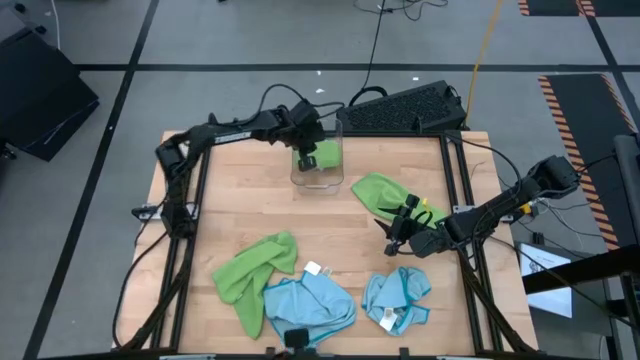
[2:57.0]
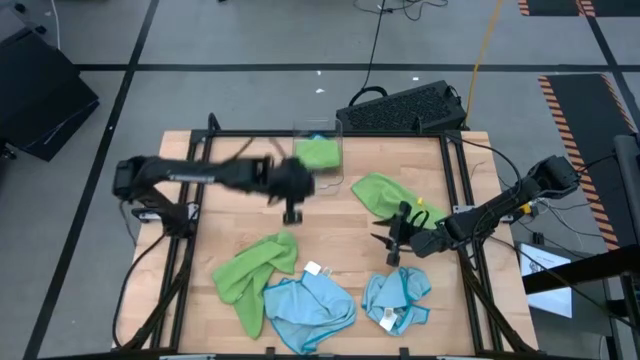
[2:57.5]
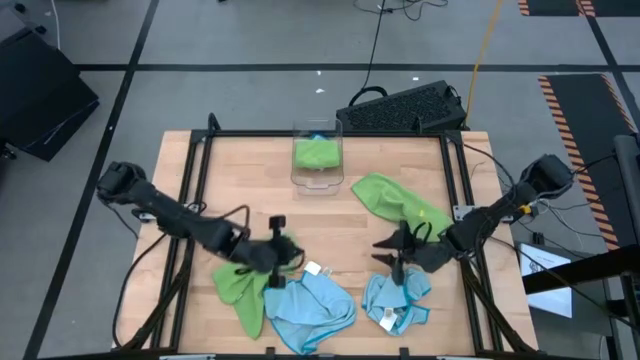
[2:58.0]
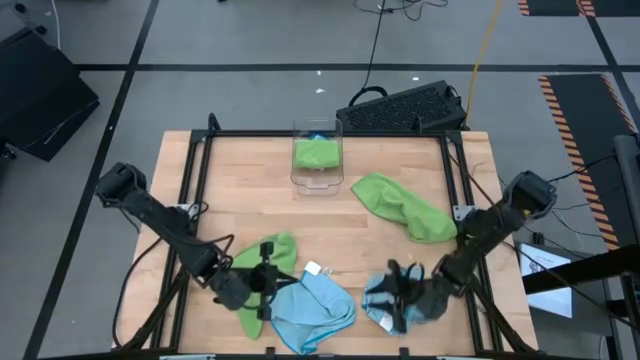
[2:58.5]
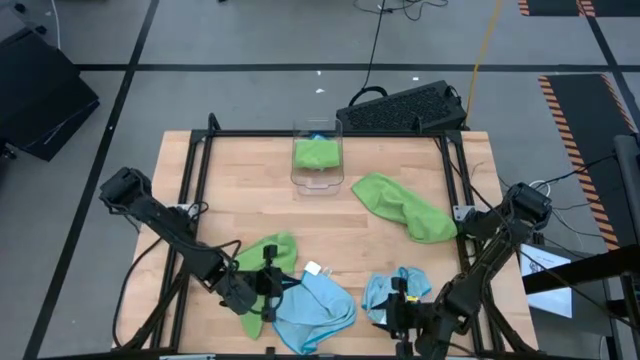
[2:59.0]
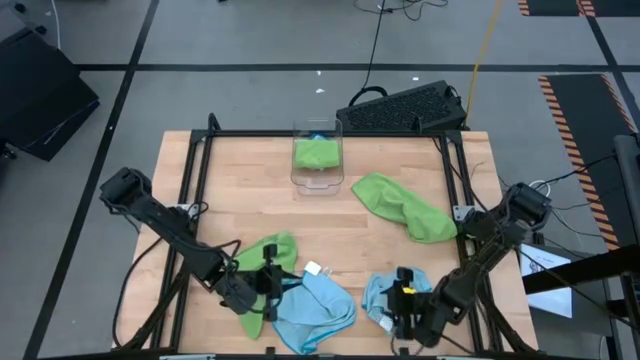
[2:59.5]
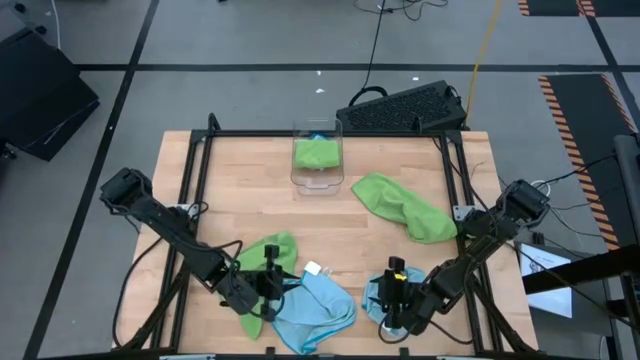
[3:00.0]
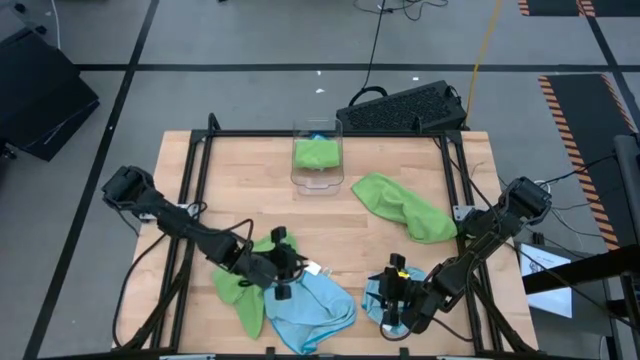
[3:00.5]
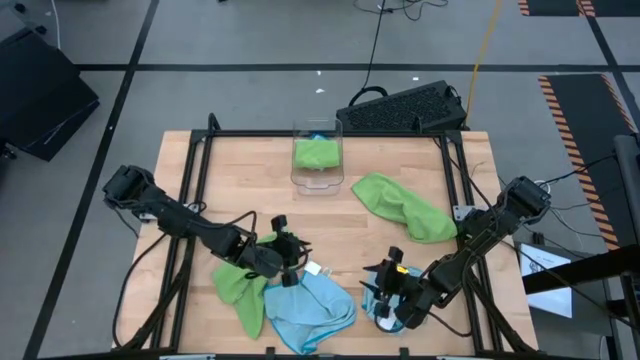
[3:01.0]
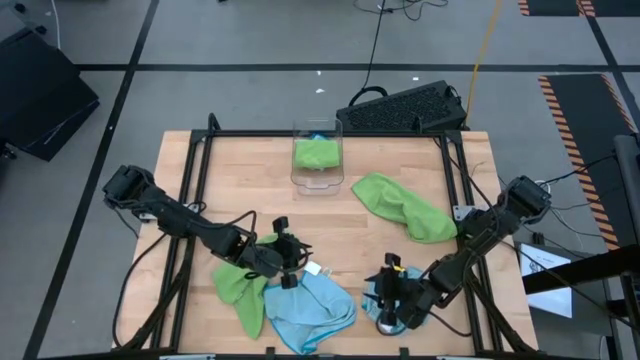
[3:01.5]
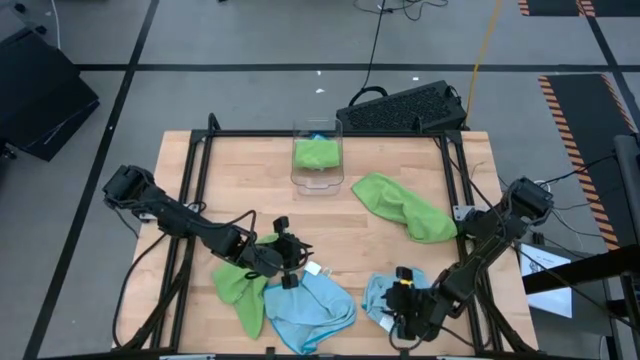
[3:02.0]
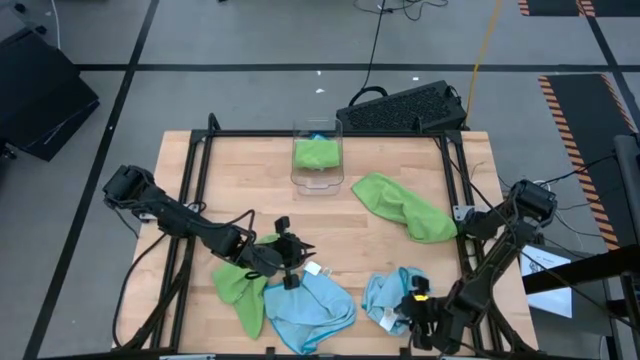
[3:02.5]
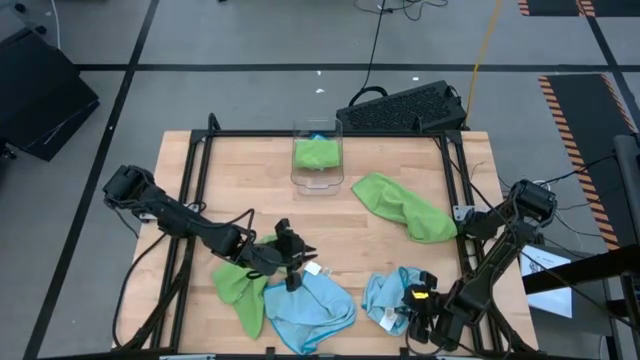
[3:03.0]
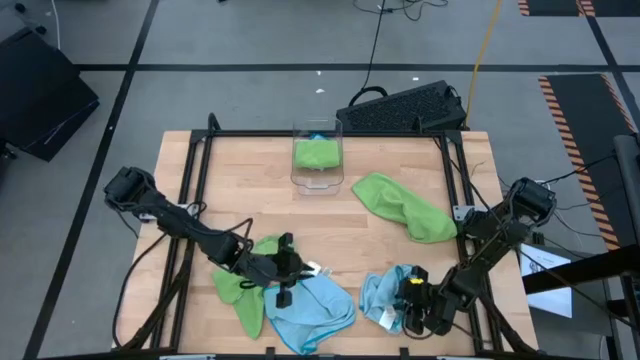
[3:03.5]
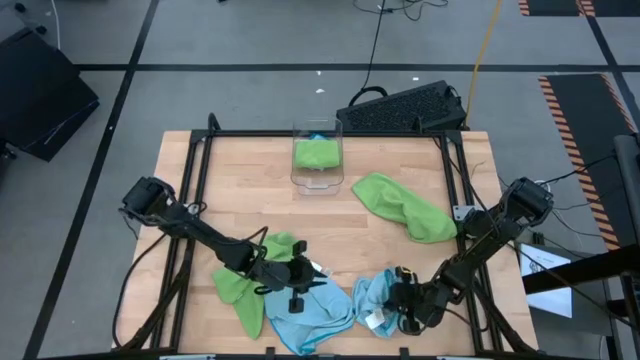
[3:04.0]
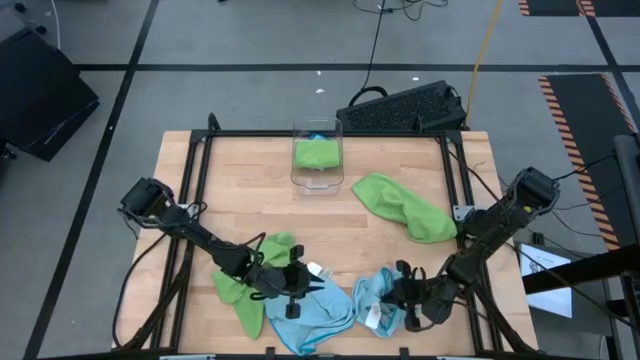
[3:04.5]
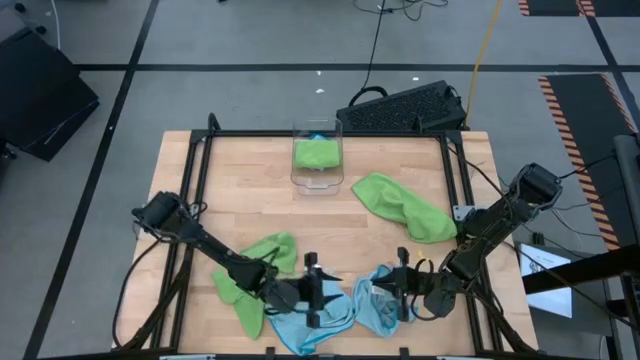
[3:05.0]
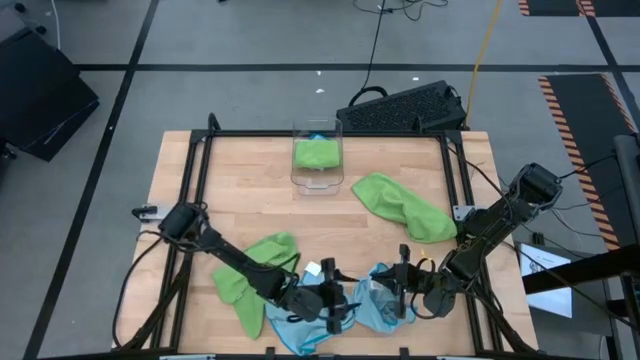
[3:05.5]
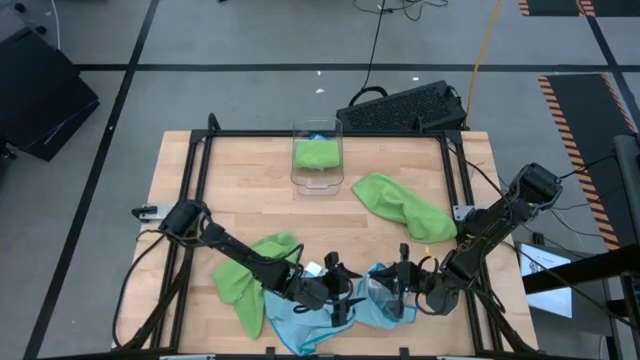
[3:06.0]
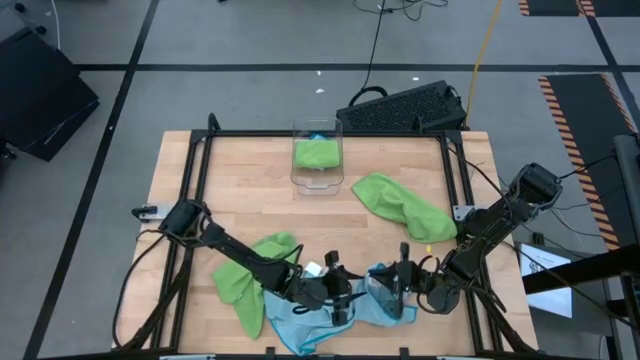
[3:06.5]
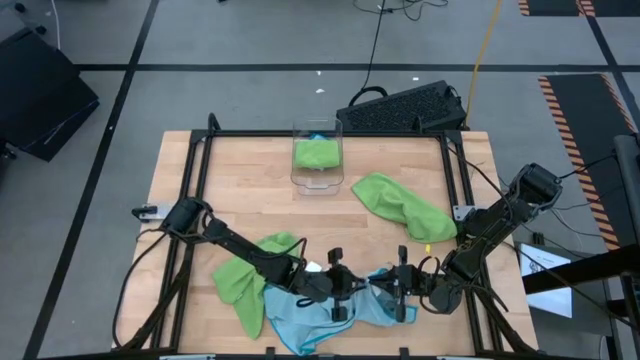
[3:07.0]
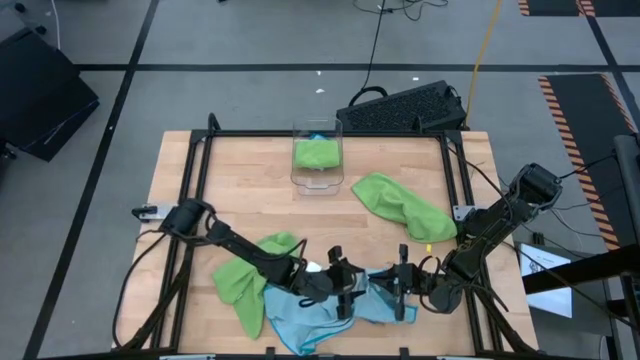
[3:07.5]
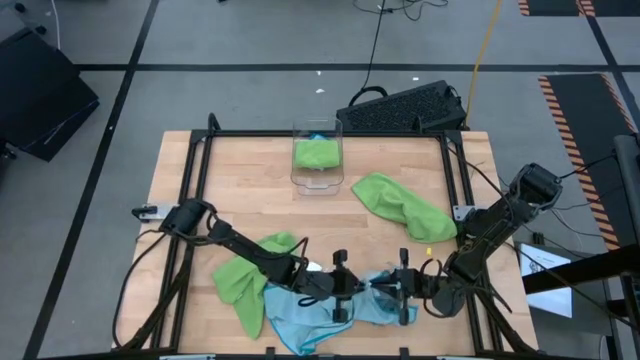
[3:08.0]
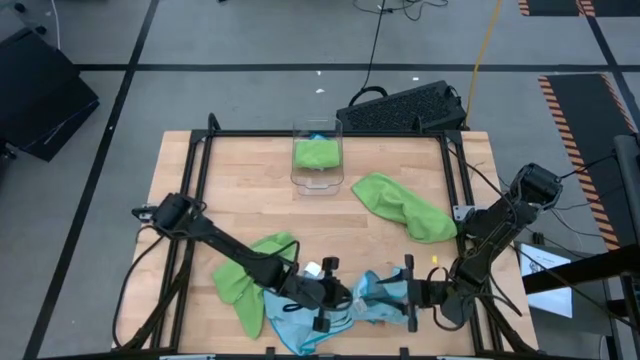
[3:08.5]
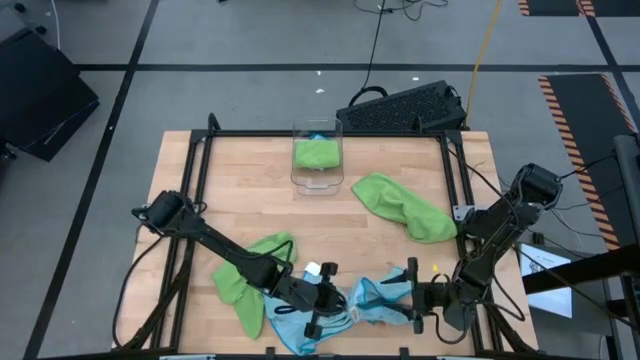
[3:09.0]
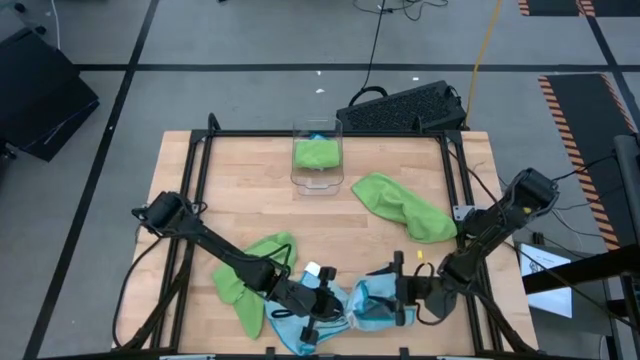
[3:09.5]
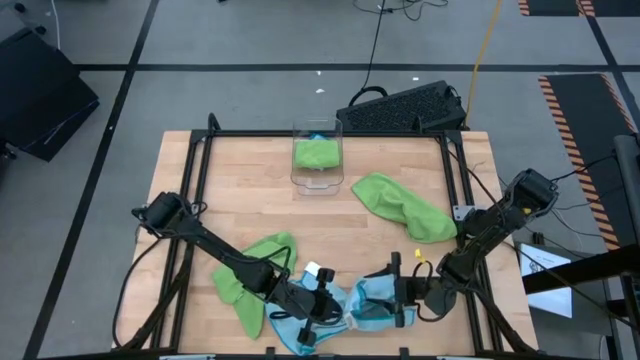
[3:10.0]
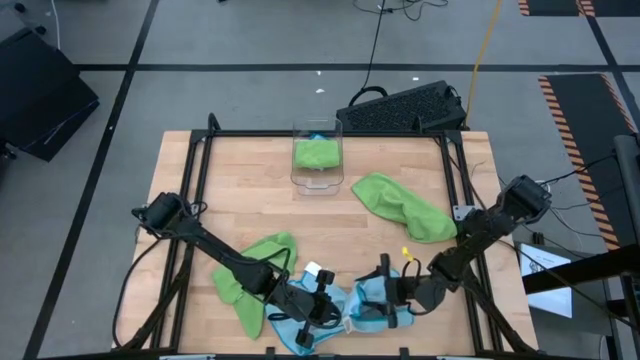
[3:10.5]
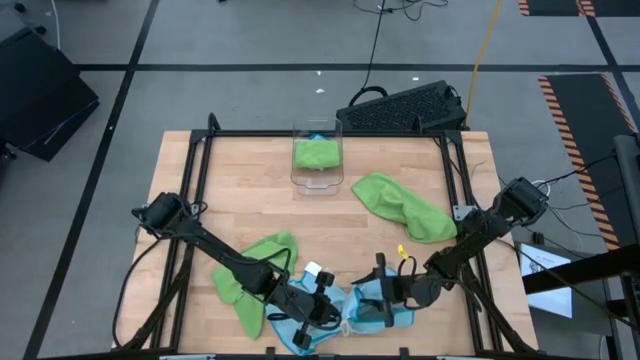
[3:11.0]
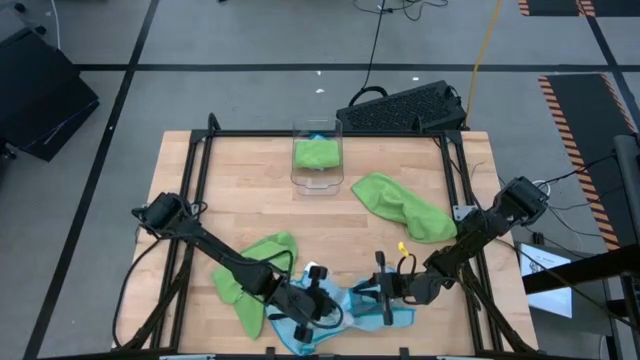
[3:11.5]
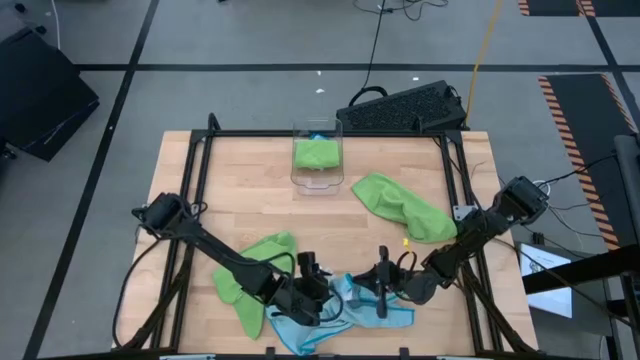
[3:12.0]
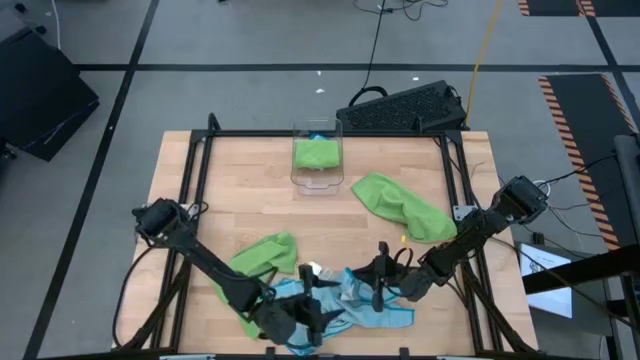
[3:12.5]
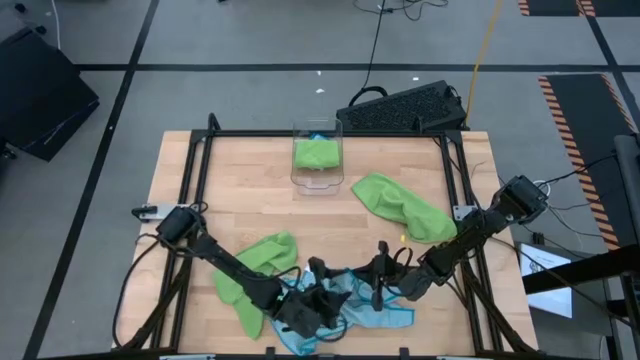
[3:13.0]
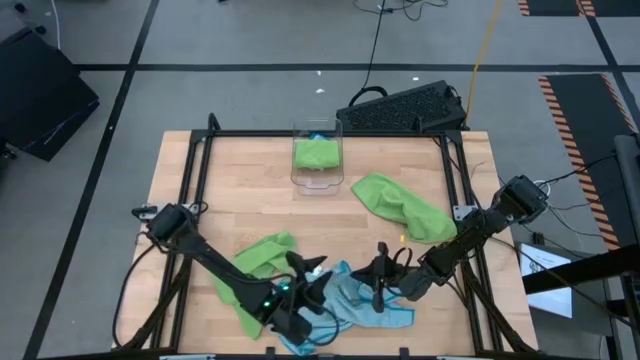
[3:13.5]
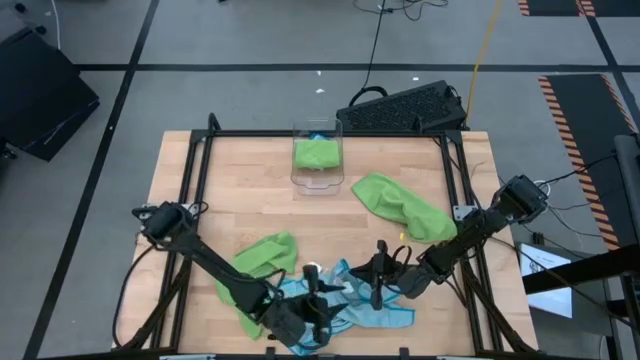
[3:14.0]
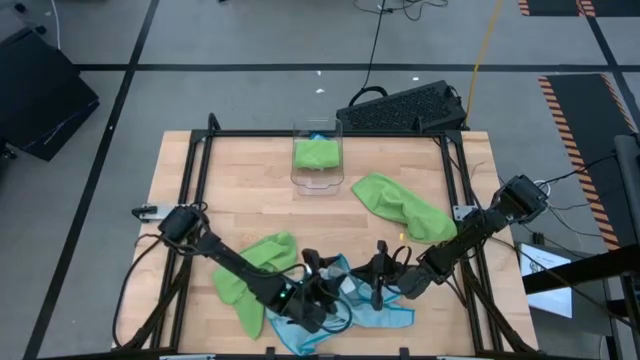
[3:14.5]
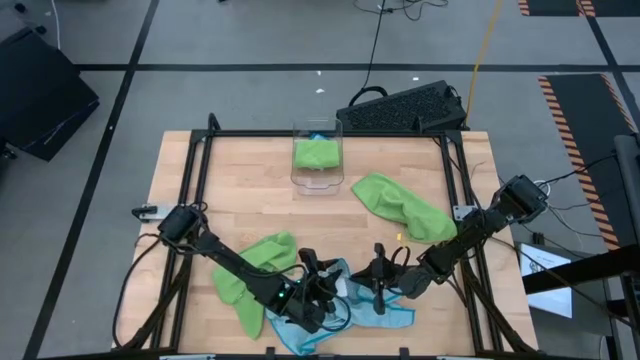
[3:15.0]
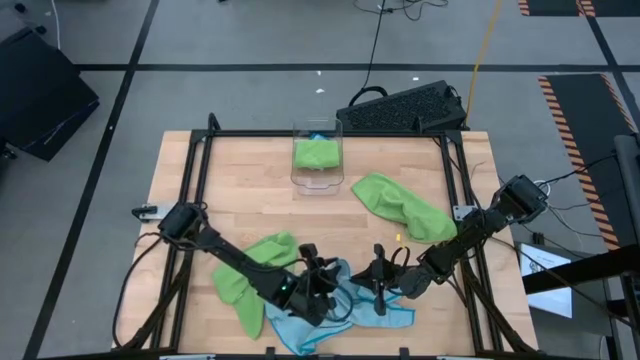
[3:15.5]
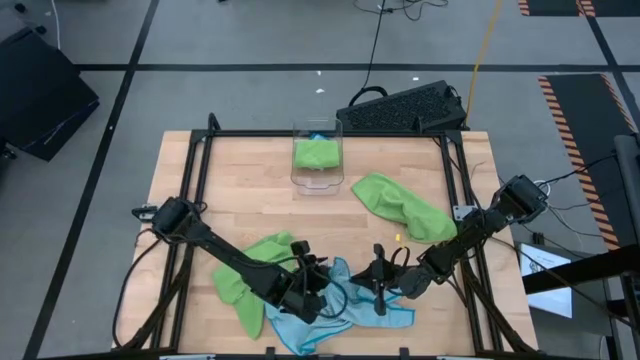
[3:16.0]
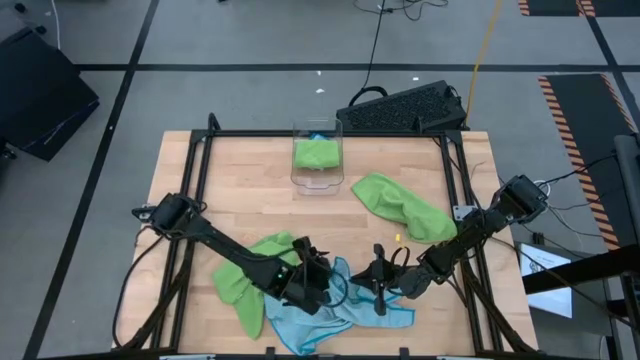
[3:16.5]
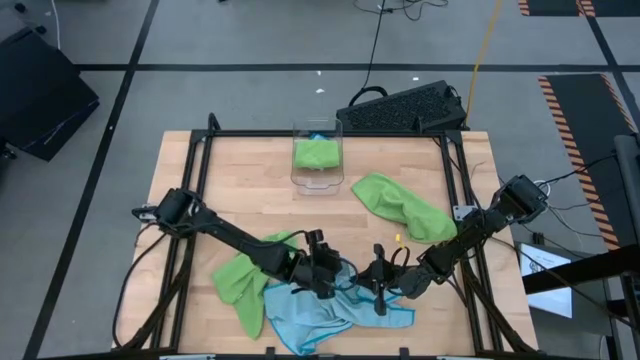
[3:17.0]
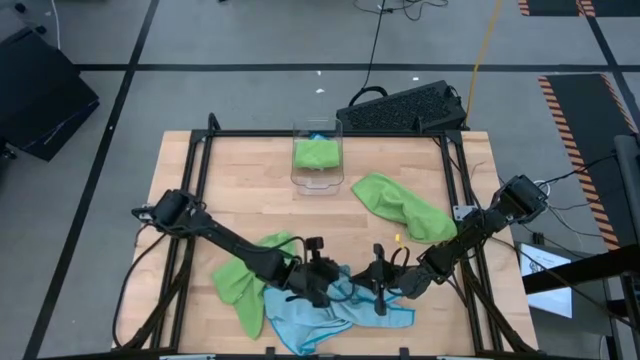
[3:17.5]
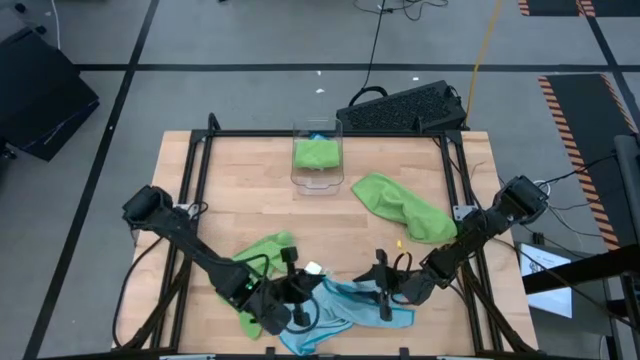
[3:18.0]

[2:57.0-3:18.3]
Task: Fold microfiber towels
Fold the right blue towel
